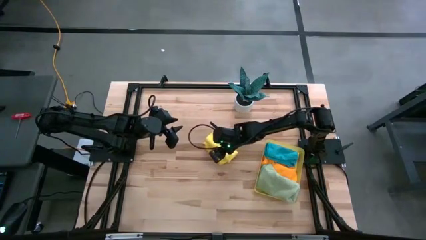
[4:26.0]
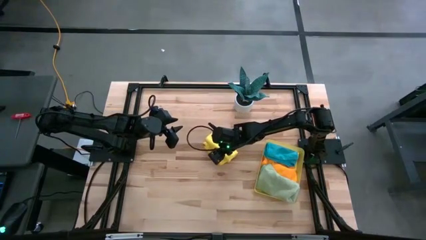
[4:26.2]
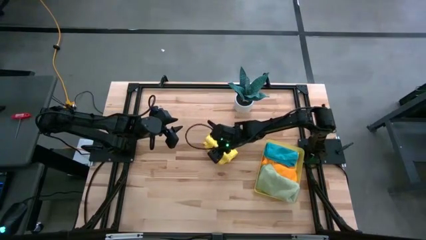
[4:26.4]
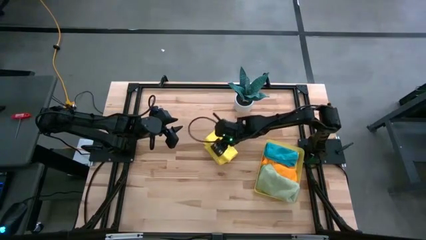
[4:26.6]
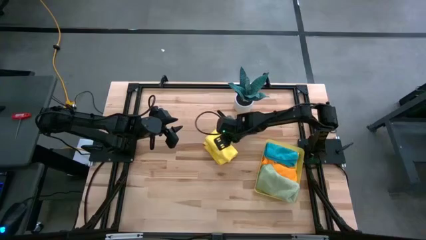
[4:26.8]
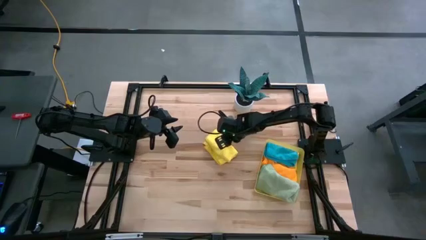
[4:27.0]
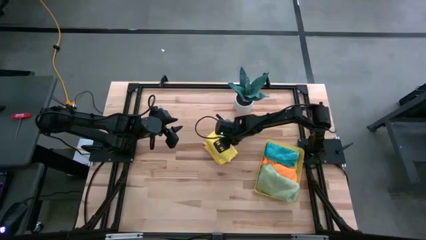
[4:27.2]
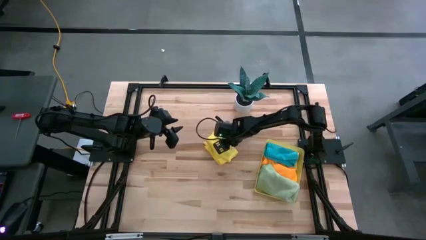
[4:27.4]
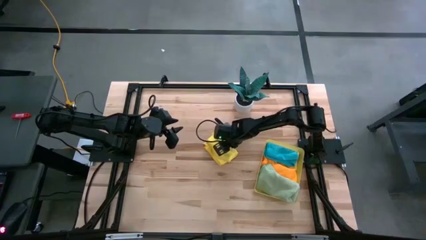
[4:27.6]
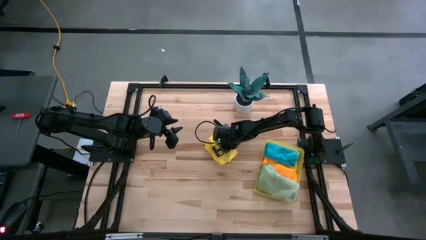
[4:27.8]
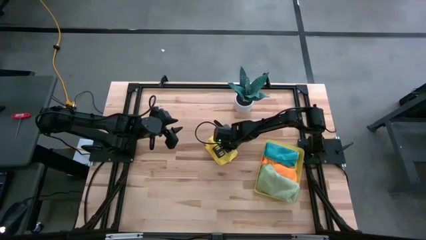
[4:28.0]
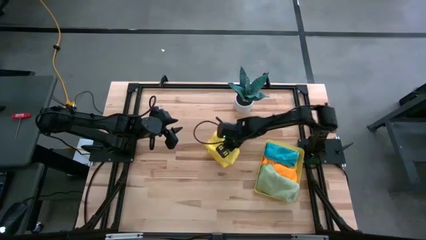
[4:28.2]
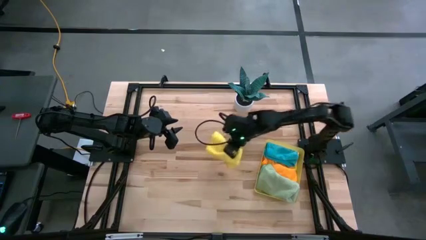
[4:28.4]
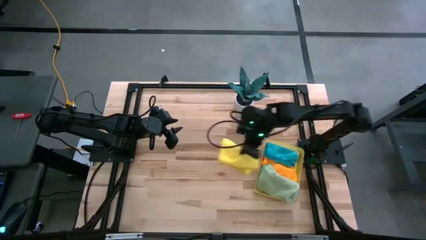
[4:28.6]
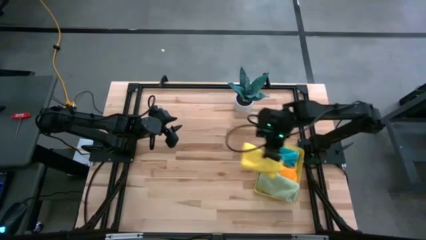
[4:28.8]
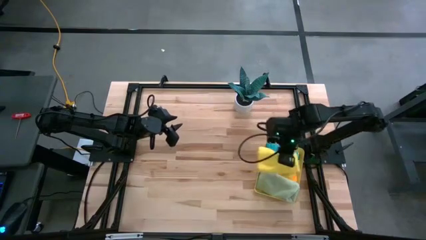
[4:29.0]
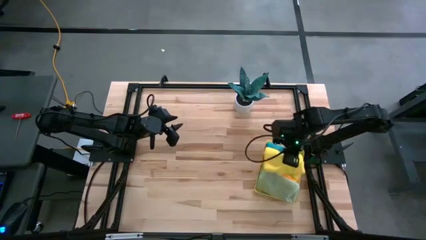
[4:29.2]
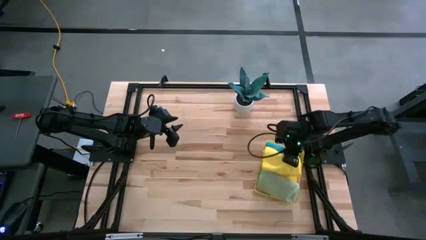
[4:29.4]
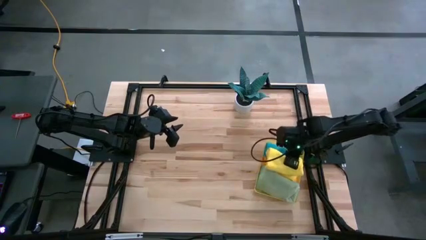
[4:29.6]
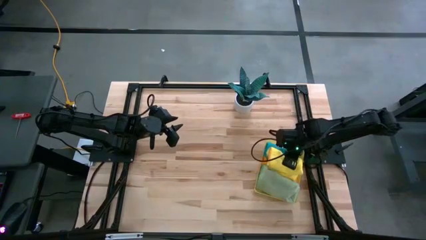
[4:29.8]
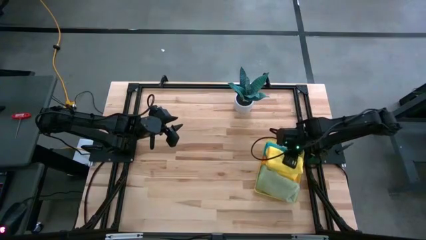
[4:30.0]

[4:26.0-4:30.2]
Task: Fold microfiber towels
Put the yellow microfiber cloth into the yellow bin

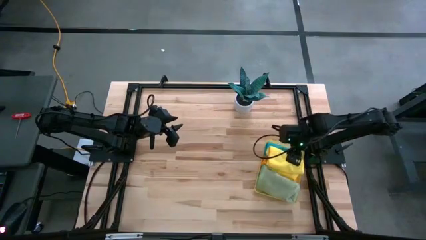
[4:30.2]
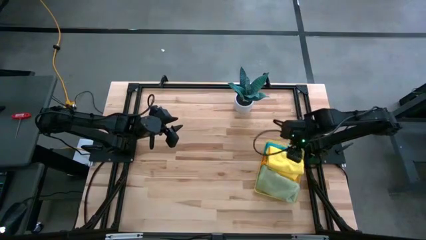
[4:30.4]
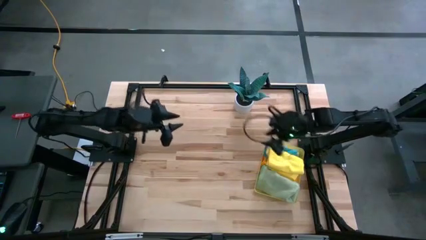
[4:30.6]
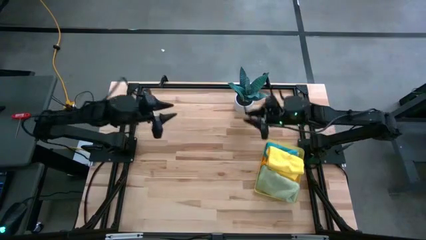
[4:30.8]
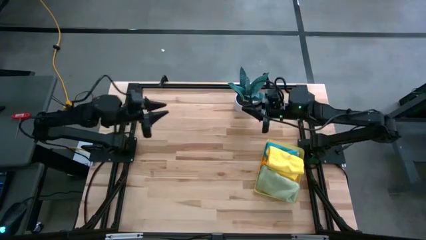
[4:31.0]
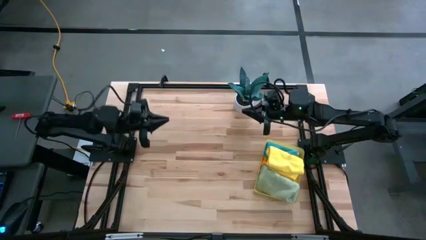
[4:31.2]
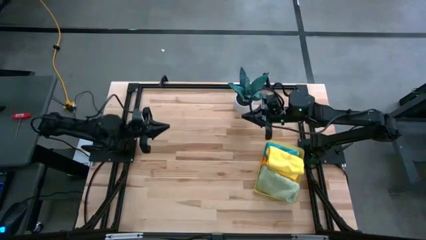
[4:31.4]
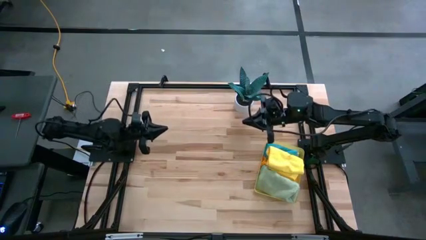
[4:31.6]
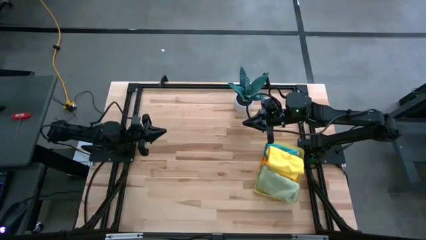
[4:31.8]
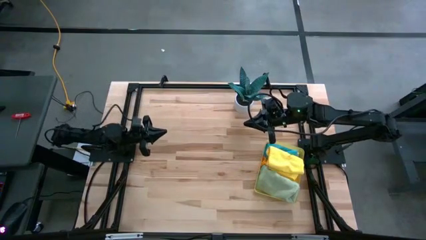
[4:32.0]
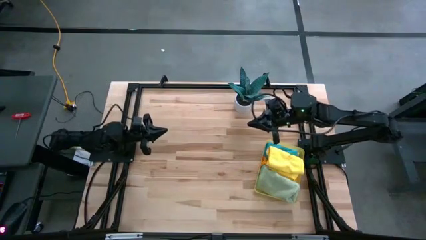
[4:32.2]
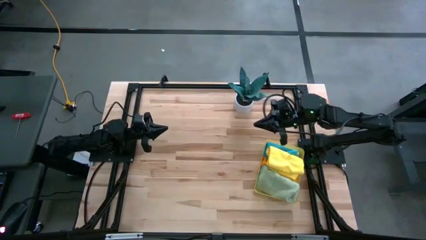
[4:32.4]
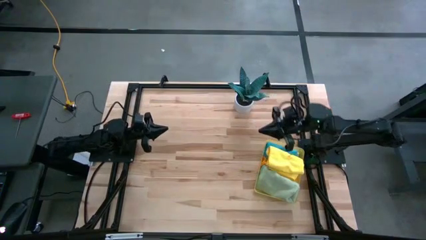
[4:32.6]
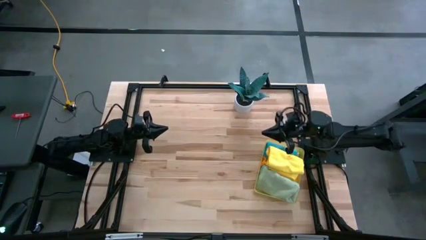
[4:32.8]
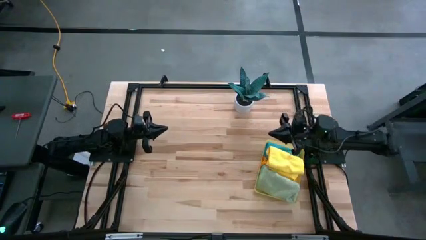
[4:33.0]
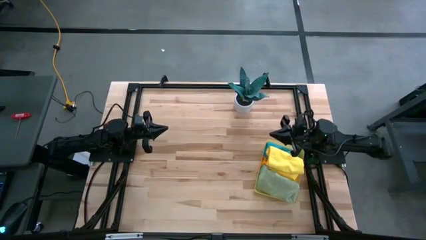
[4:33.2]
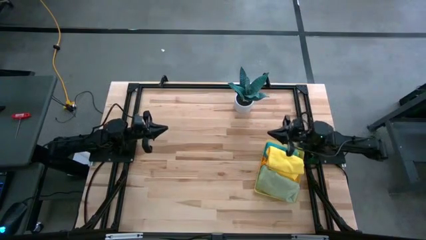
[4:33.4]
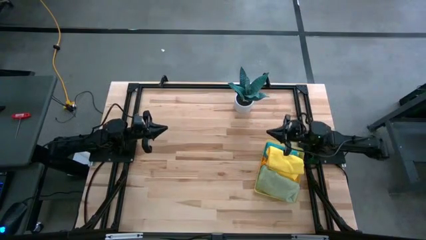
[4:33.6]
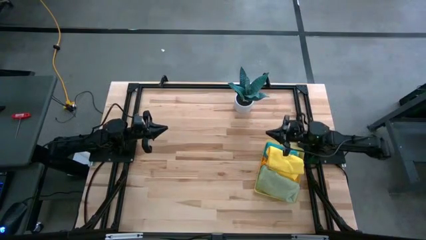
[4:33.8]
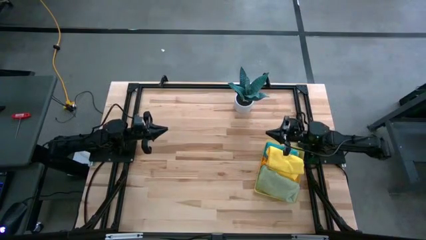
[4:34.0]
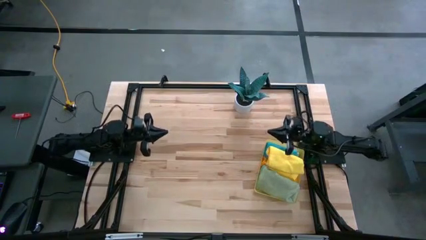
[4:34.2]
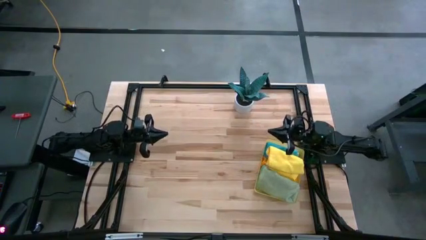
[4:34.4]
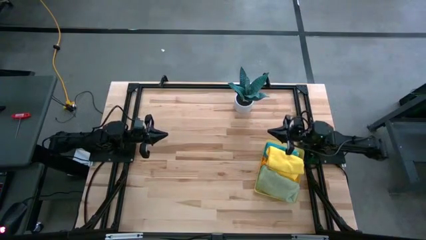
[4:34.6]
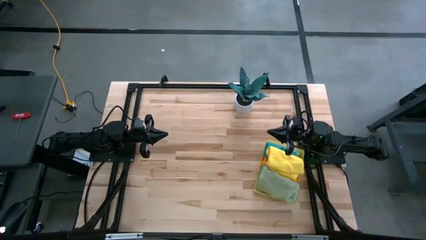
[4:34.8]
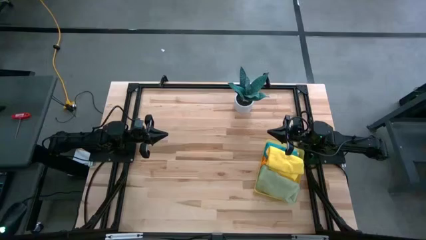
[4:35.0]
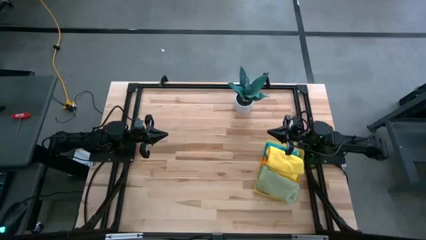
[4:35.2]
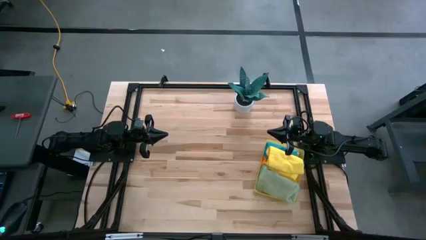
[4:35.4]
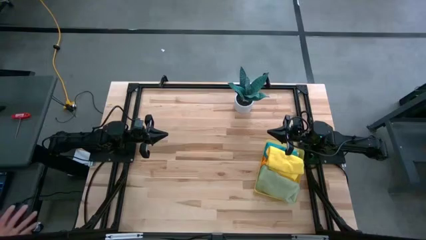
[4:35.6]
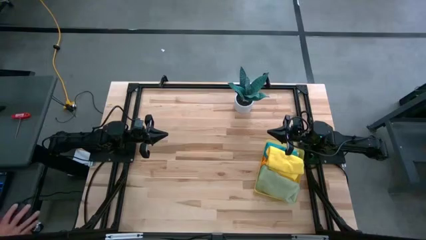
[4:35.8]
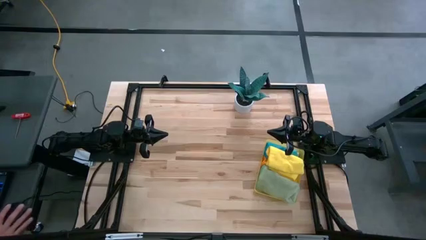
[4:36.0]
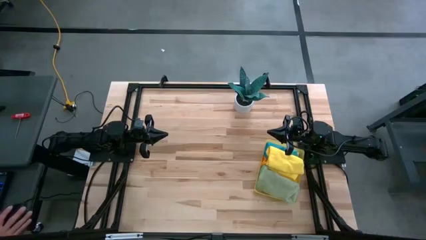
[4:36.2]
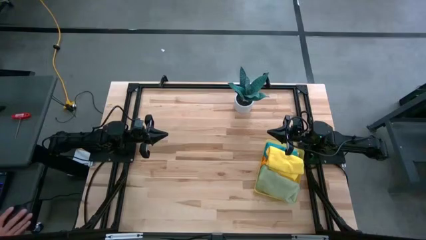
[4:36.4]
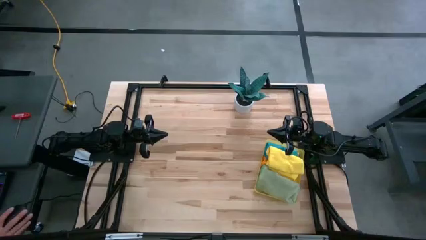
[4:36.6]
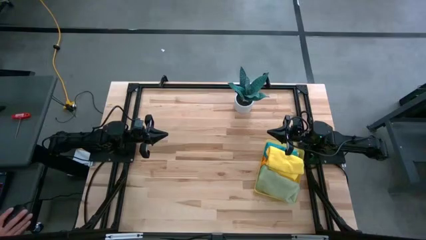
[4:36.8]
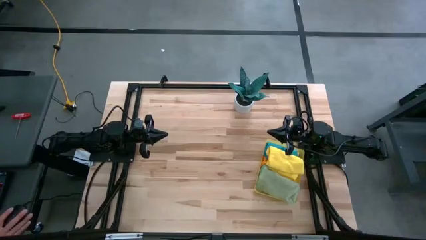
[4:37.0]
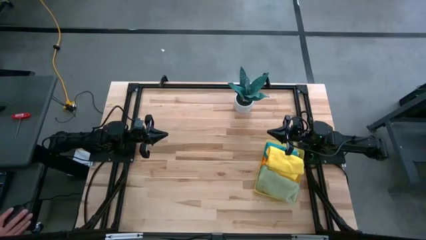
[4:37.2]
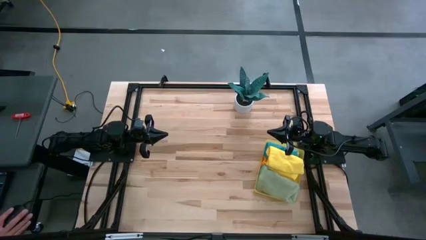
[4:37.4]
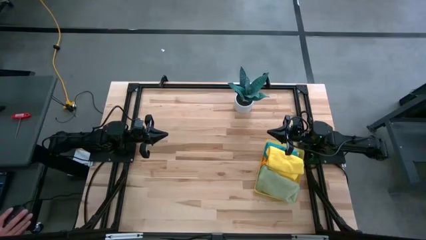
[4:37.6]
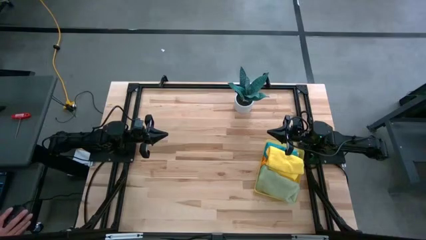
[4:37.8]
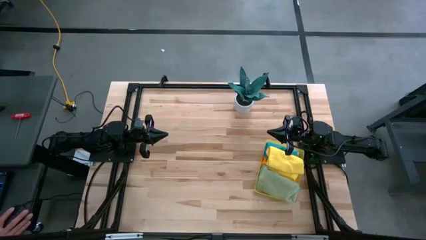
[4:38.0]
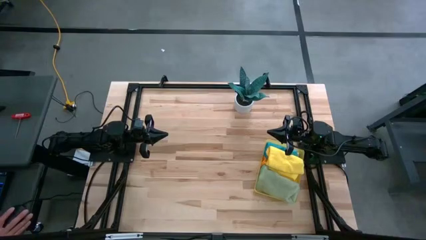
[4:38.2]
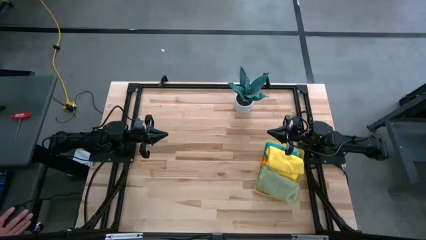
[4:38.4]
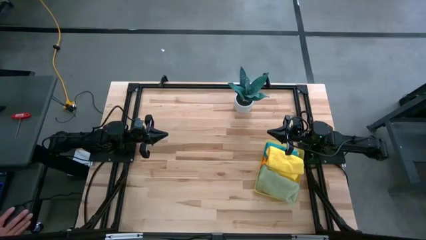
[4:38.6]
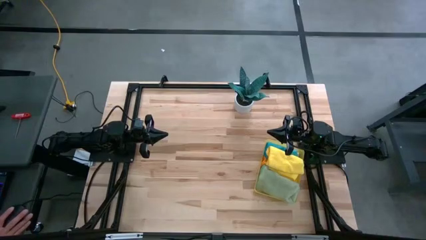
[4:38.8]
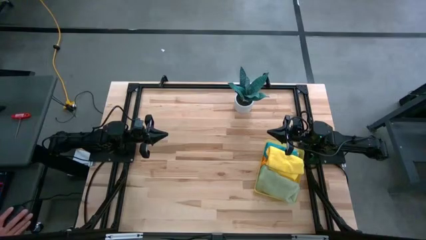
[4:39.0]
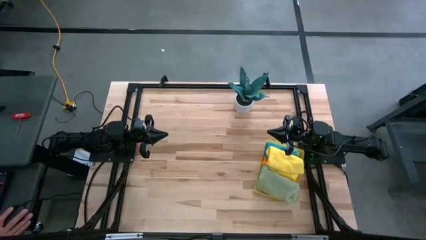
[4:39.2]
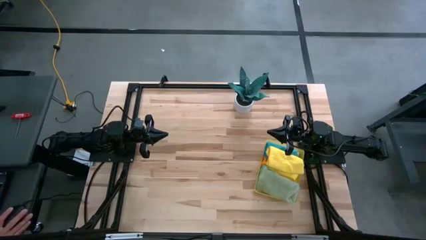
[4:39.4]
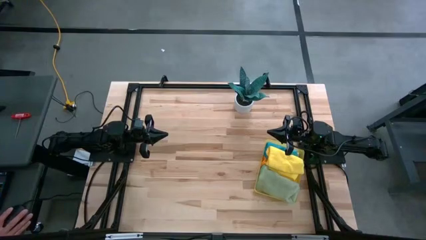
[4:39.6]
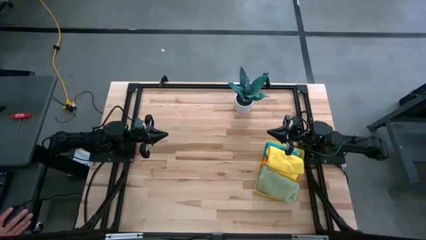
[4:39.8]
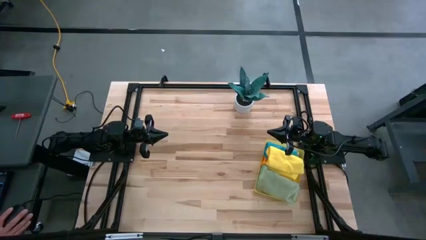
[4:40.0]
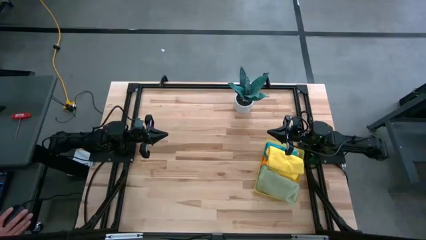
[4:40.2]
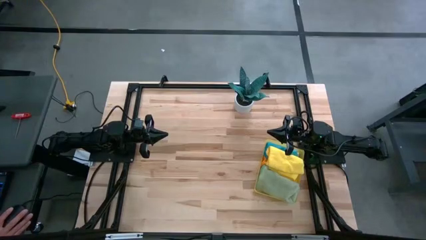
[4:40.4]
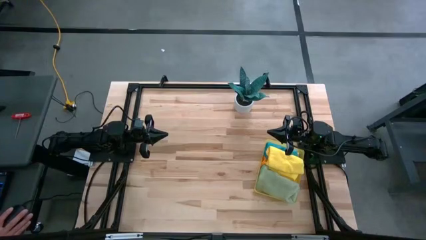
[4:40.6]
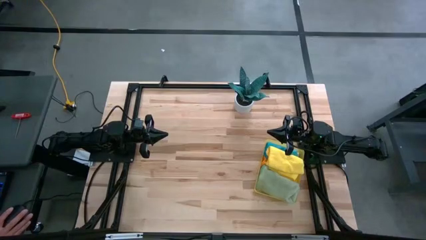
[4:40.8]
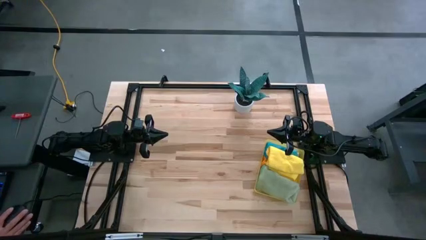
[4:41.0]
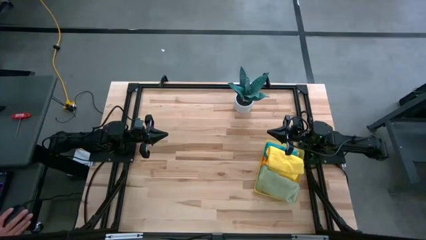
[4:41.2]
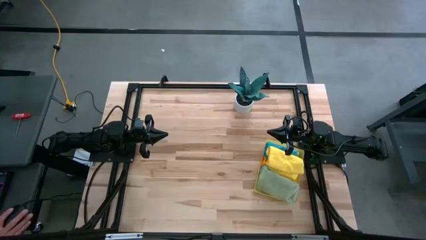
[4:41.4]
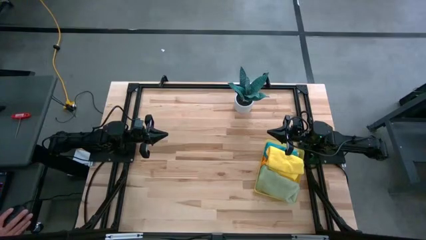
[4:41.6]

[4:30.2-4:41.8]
Return to Home Position
